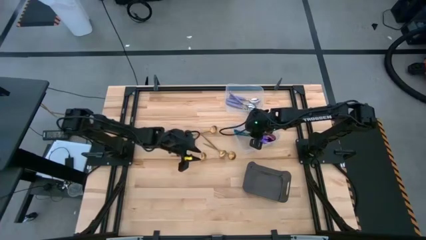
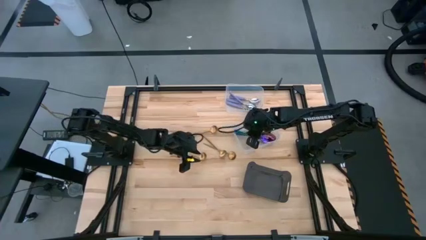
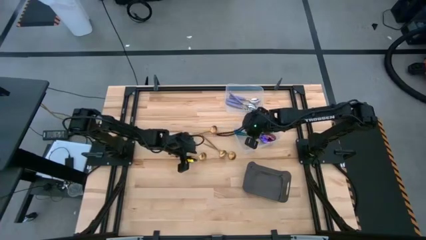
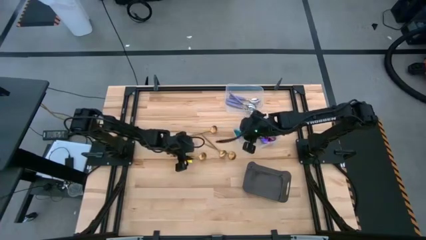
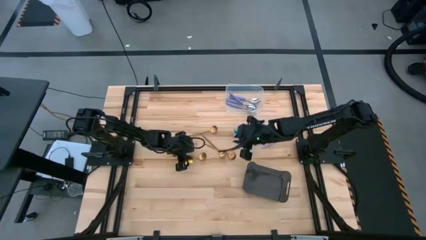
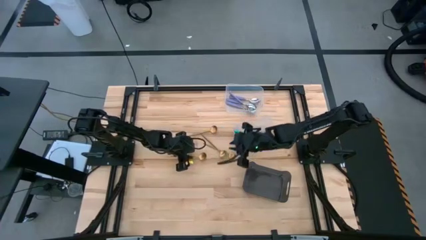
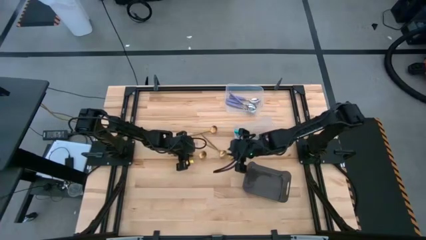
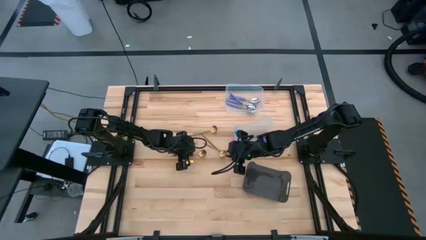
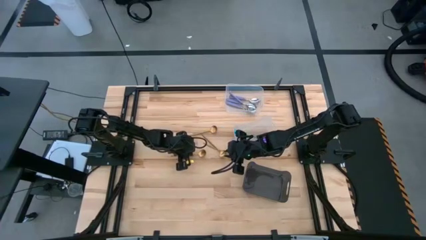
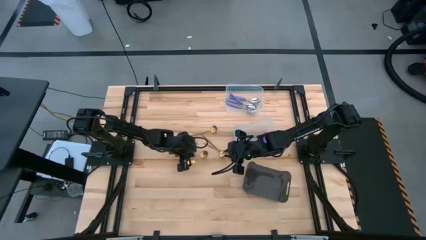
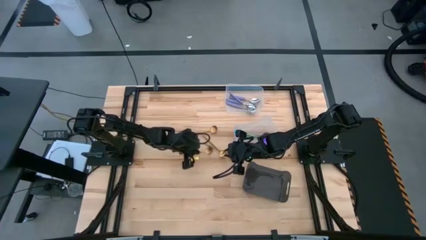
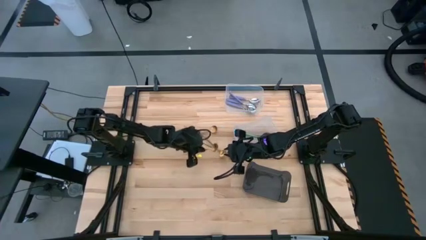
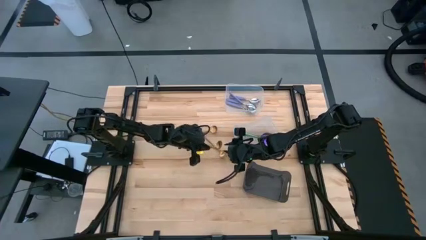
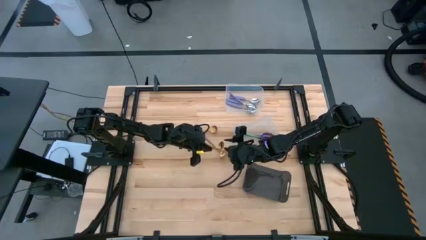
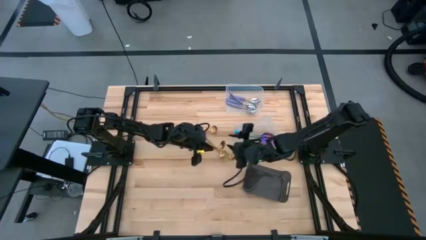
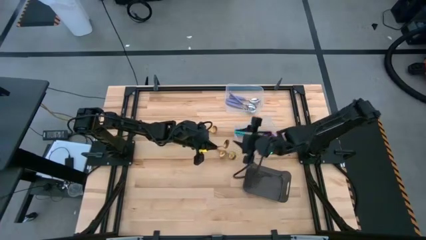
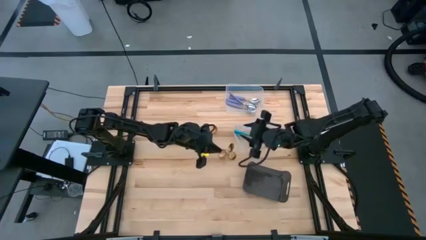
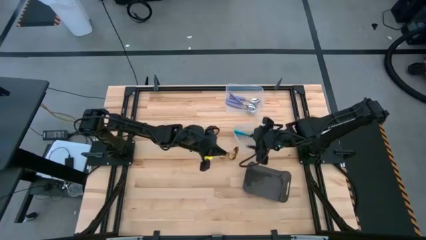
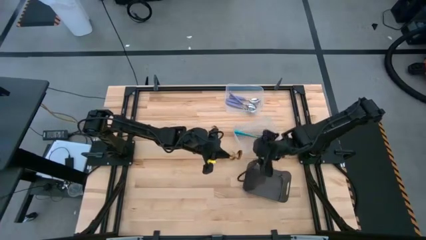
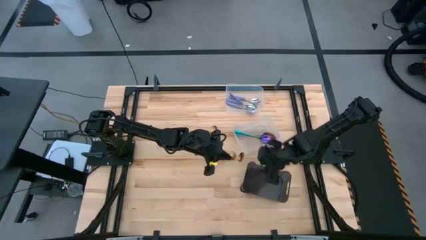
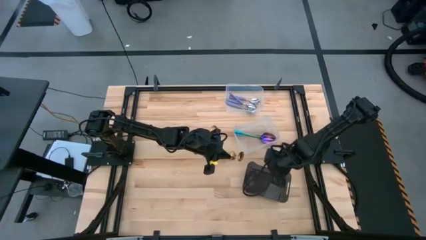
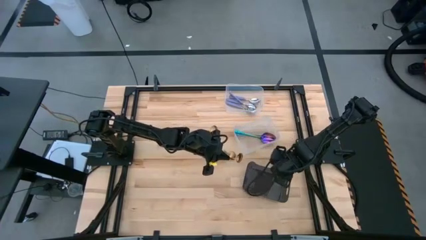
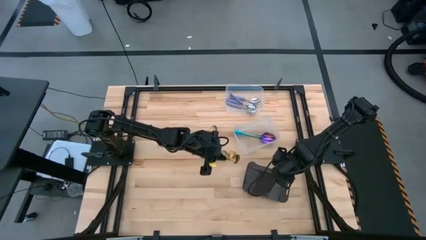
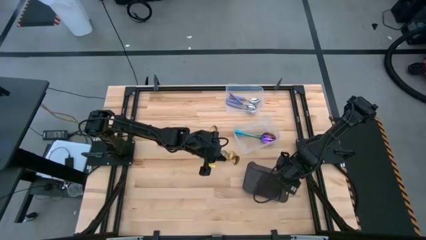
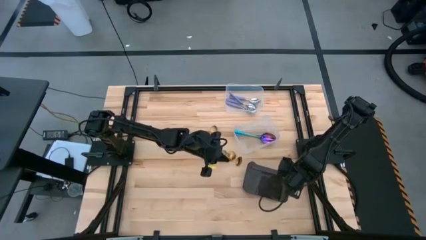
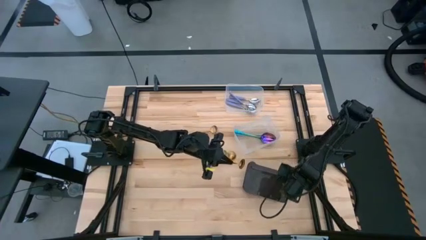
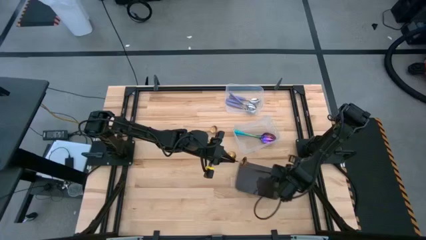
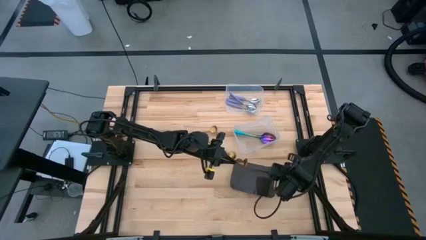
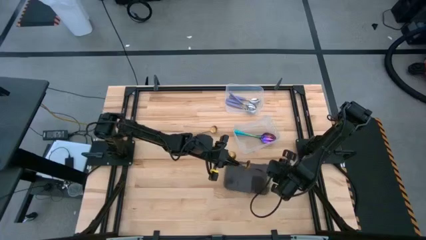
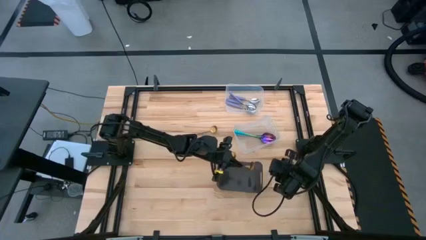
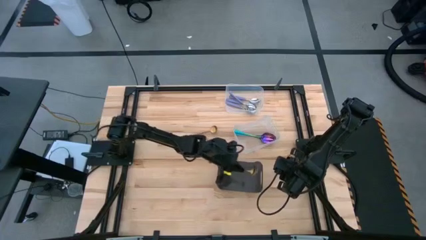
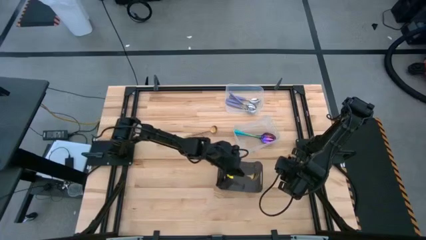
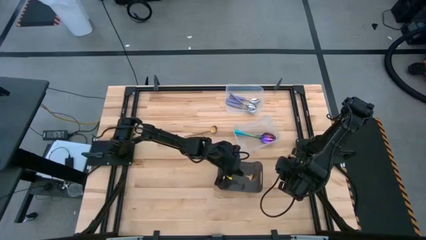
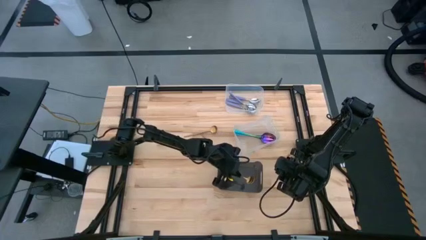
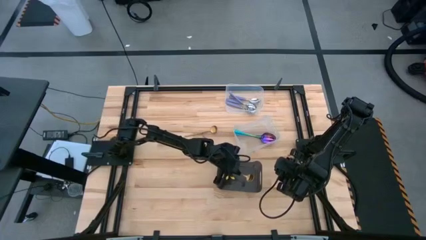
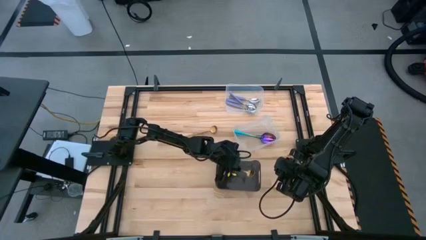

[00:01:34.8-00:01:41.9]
Task: Sort silverware by color (type)
Put the gold spoon into the black bin

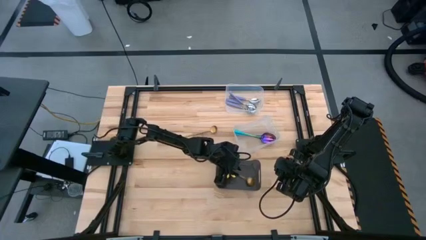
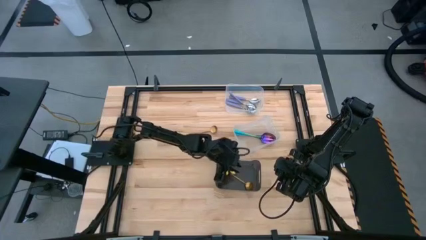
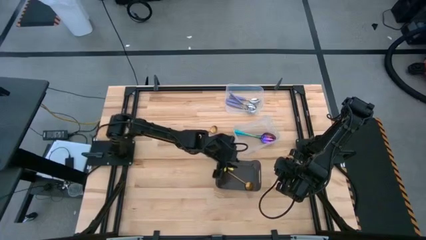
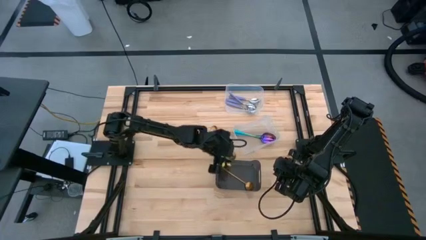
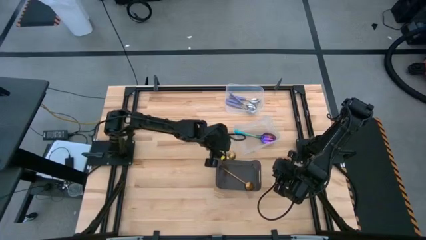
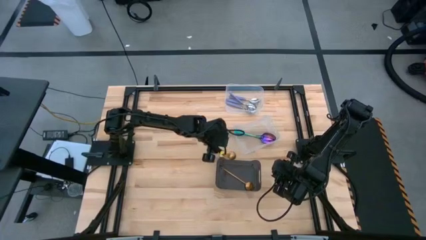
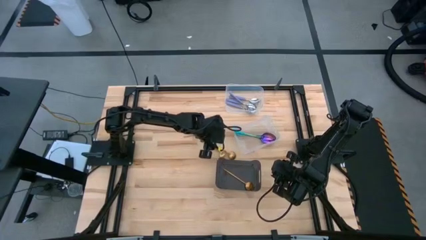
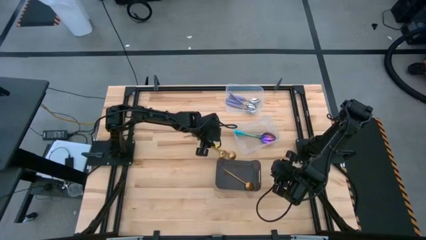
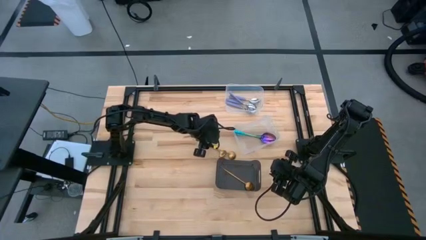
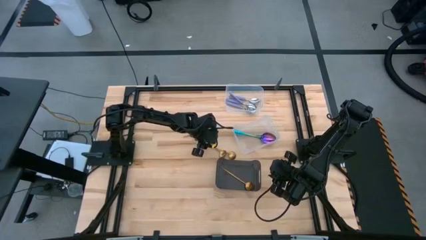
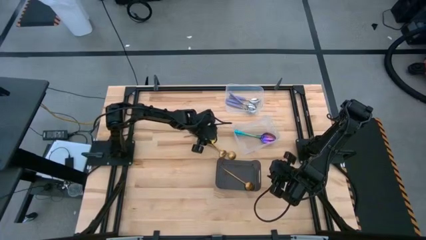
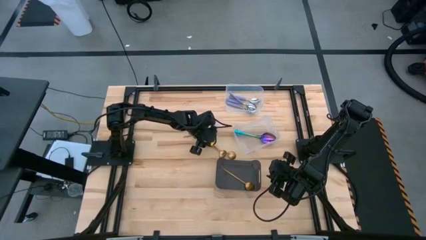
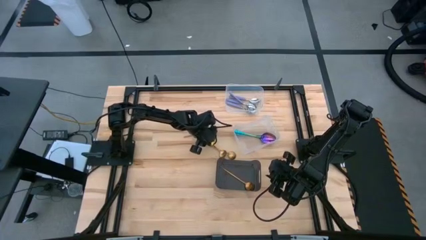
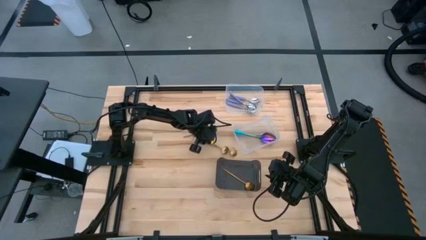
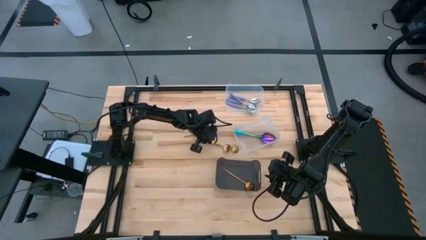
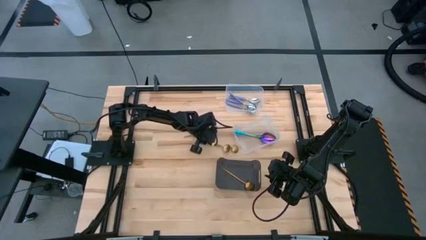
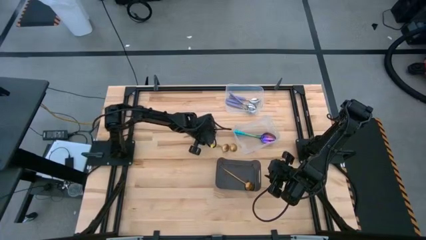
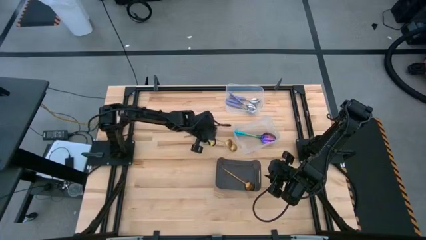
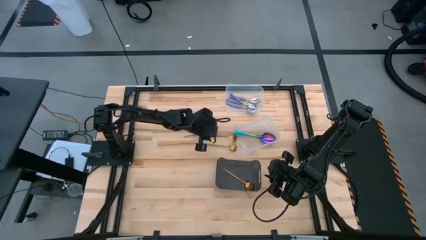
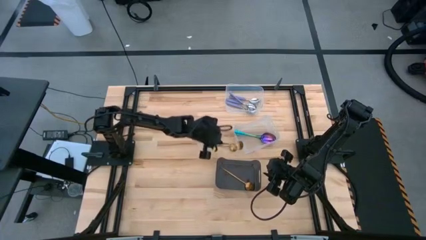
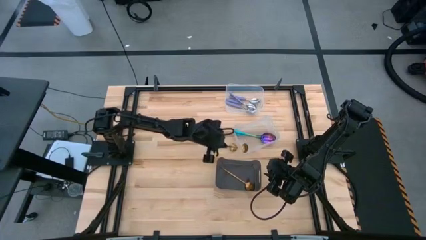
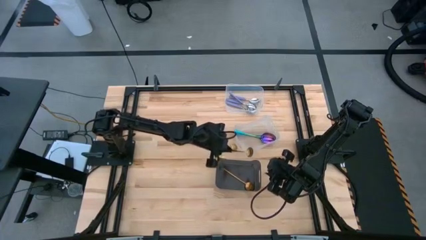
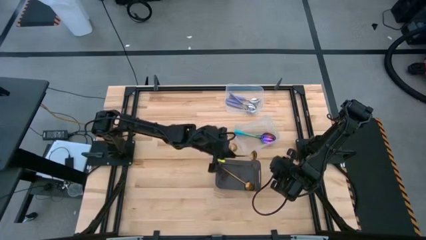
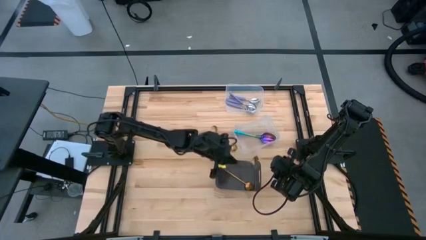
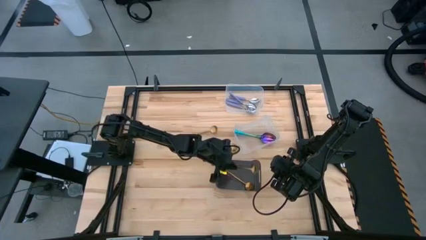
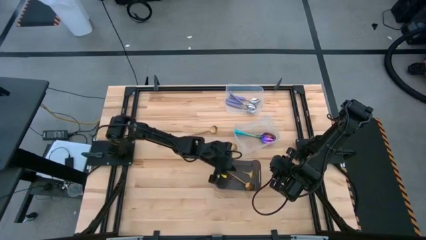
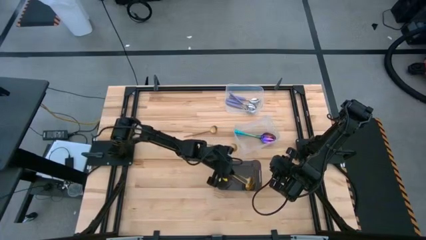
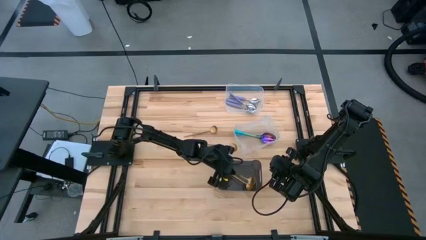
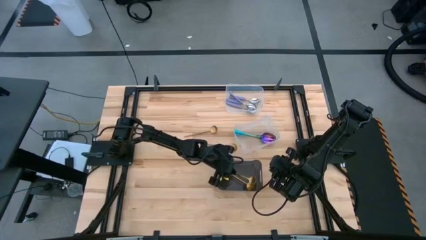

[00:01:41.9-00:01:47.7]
Put the gold spoon into the black bin

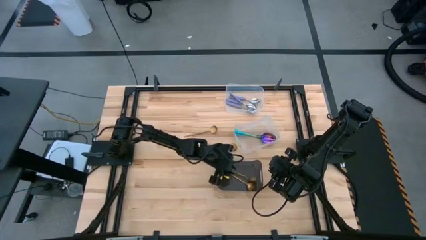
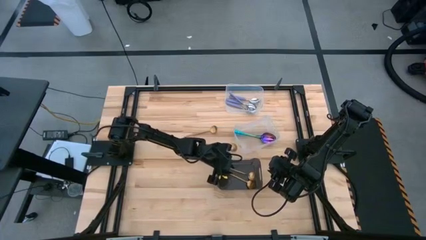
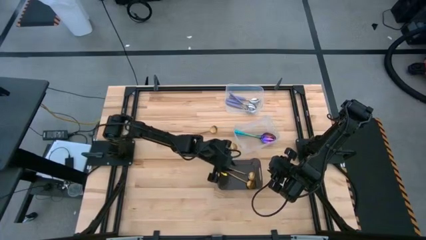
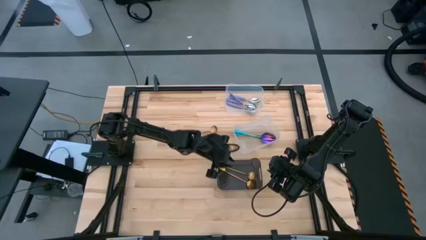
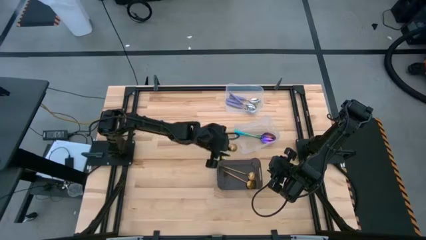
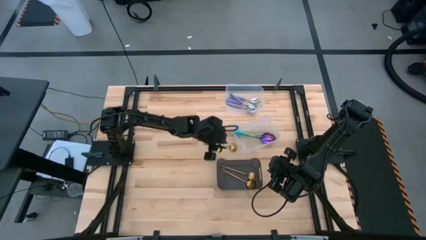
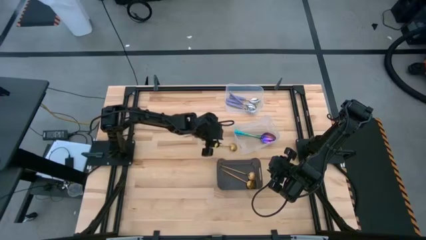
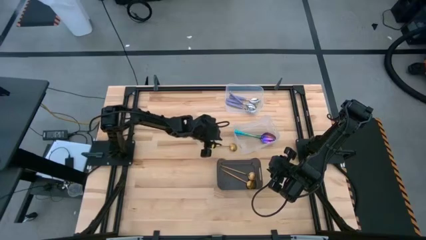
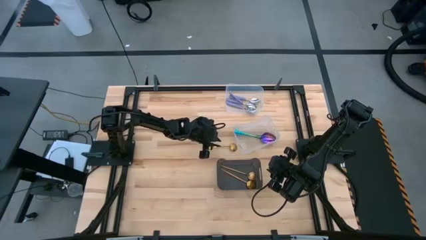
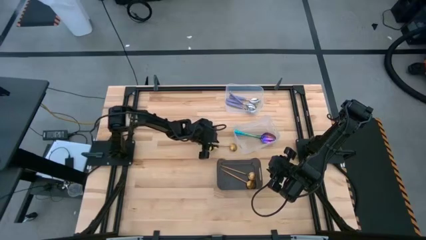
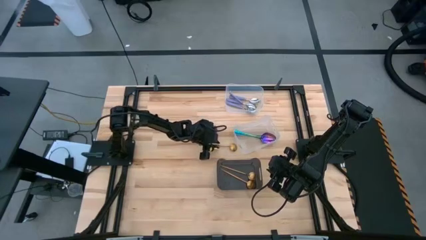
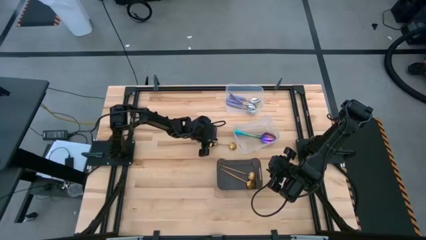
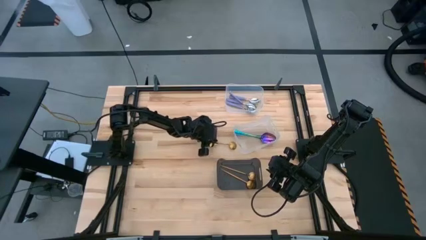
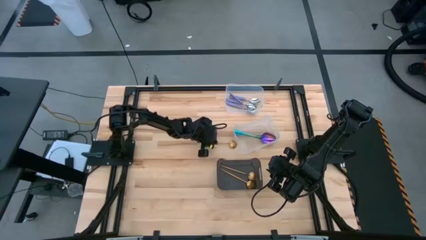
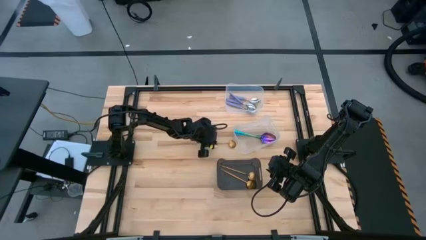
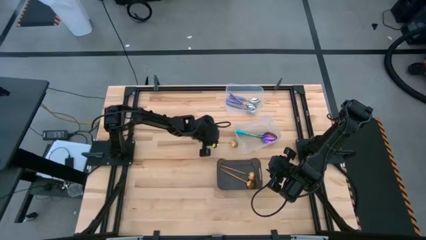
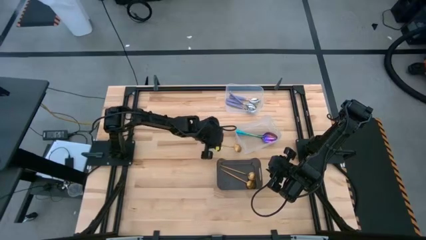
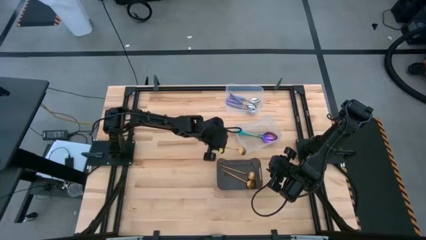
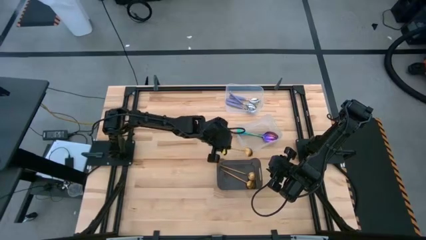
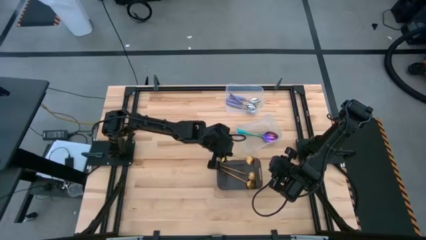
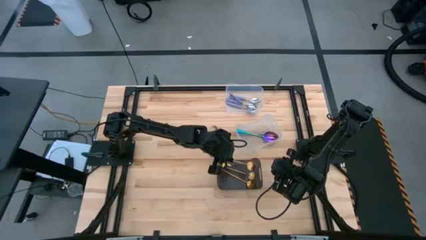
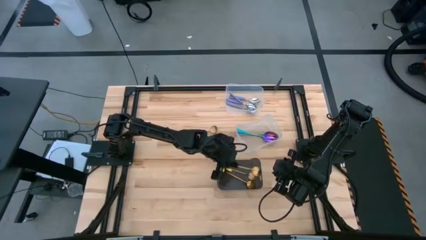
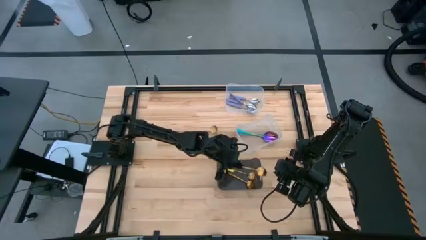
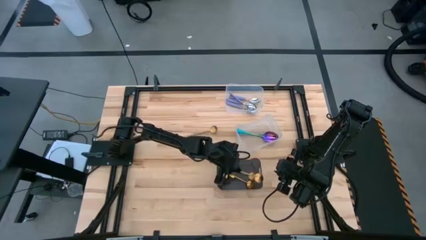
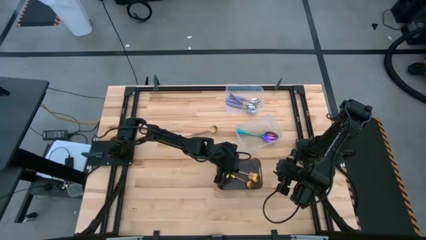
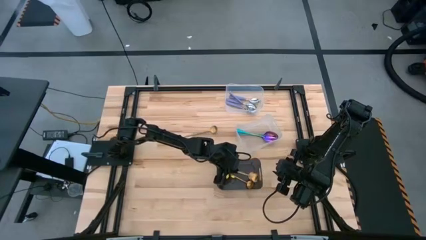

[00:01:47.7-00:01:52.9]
Put the gold spoon into the black bin
